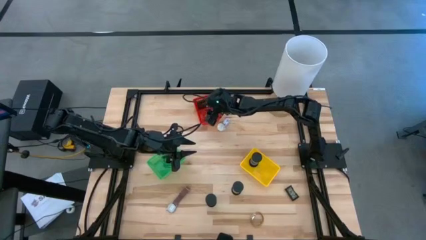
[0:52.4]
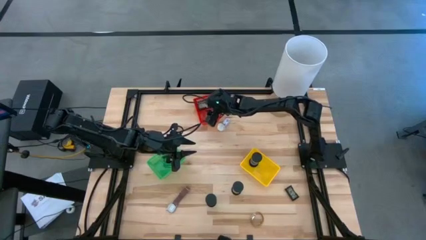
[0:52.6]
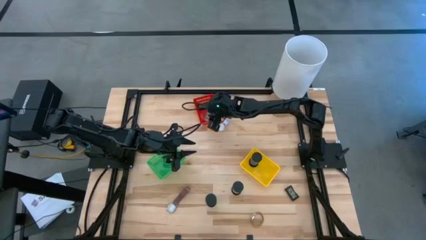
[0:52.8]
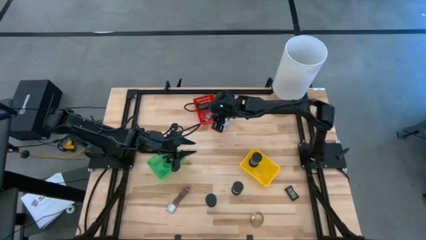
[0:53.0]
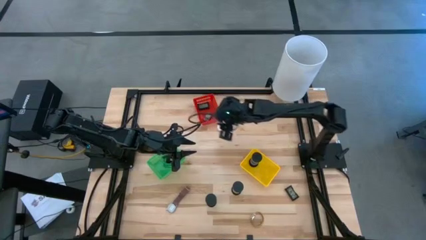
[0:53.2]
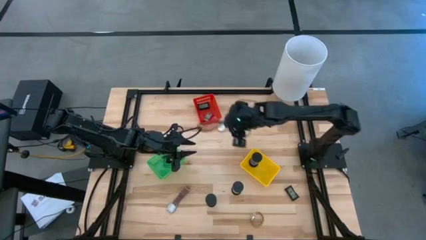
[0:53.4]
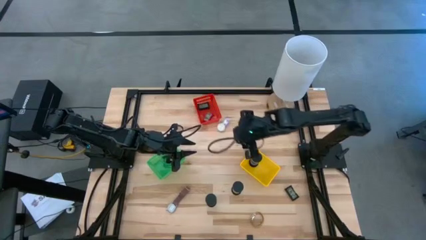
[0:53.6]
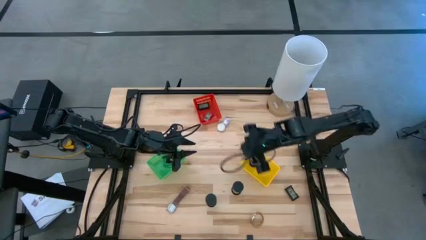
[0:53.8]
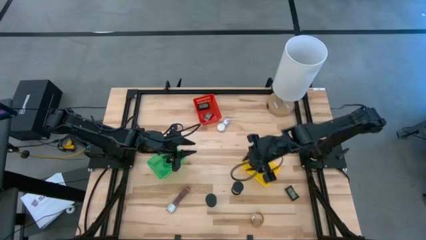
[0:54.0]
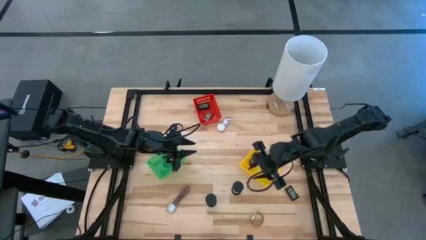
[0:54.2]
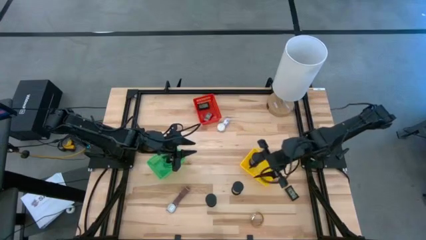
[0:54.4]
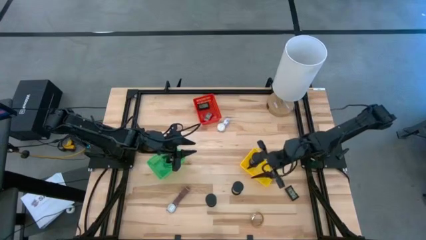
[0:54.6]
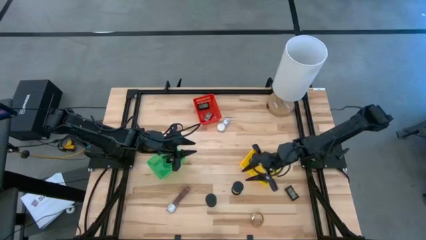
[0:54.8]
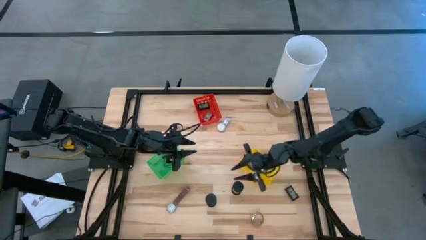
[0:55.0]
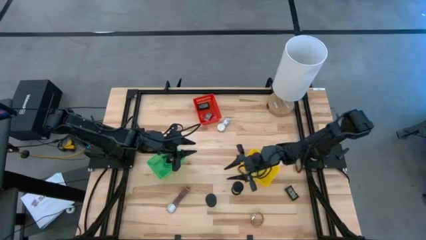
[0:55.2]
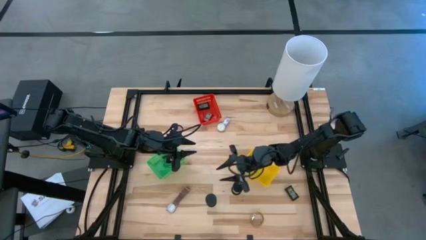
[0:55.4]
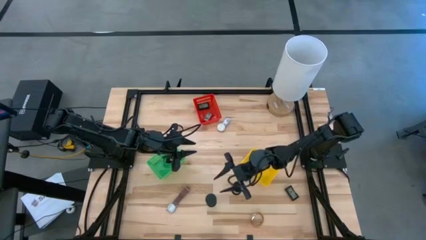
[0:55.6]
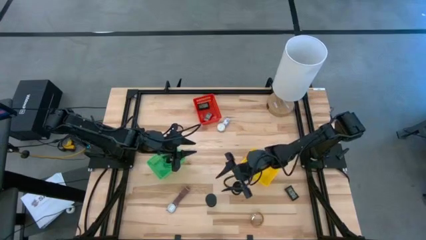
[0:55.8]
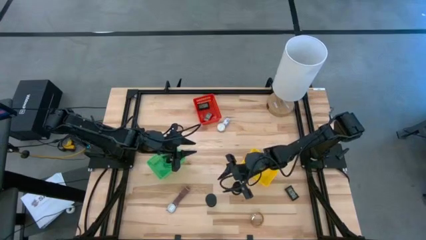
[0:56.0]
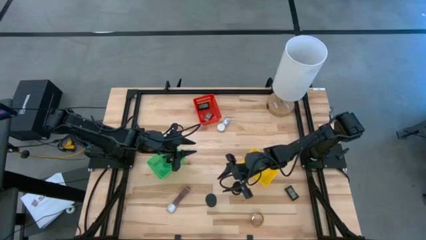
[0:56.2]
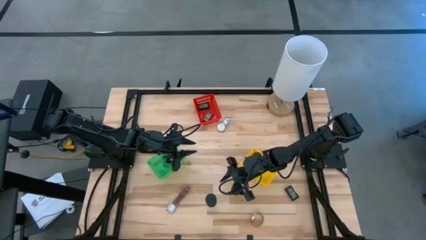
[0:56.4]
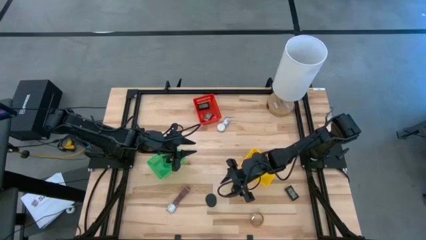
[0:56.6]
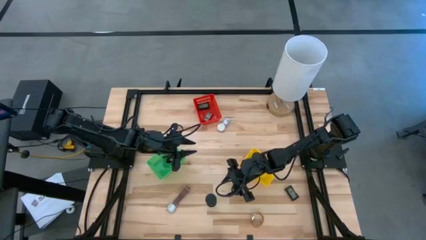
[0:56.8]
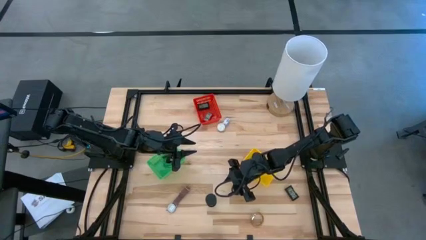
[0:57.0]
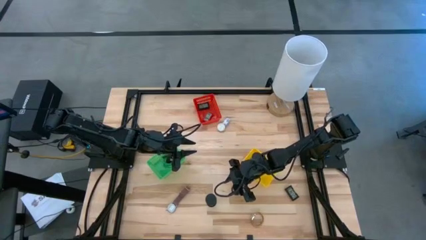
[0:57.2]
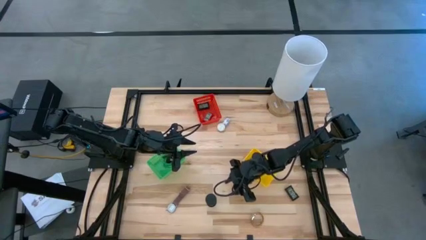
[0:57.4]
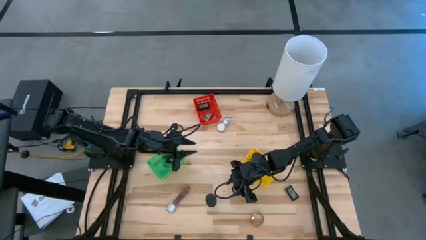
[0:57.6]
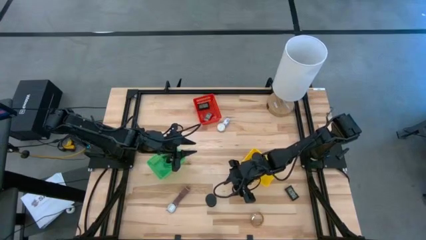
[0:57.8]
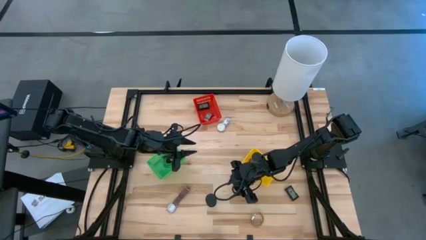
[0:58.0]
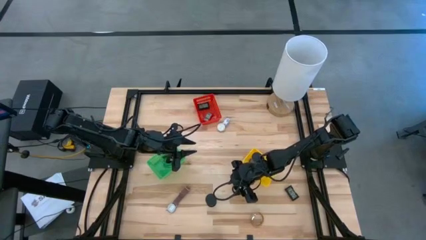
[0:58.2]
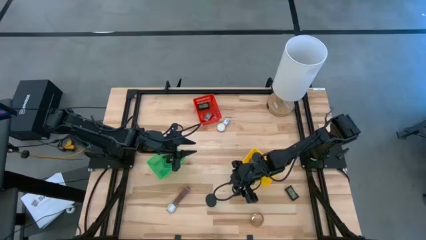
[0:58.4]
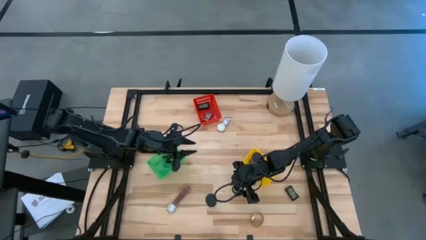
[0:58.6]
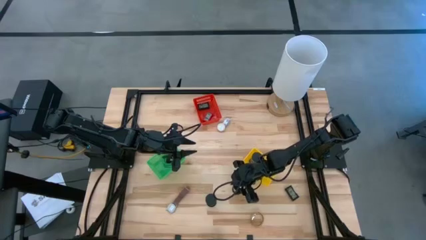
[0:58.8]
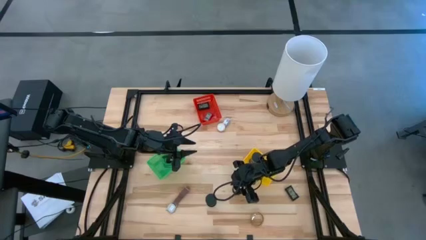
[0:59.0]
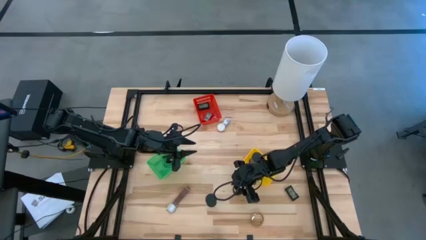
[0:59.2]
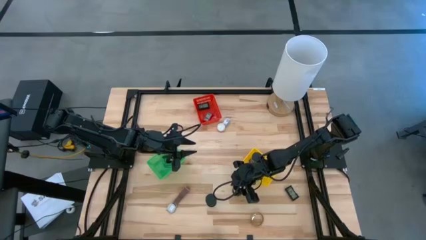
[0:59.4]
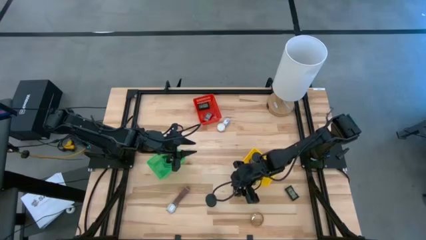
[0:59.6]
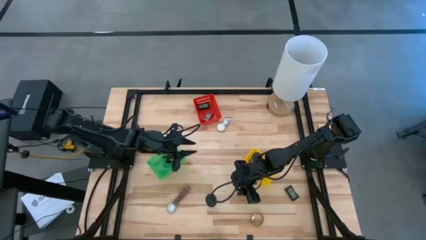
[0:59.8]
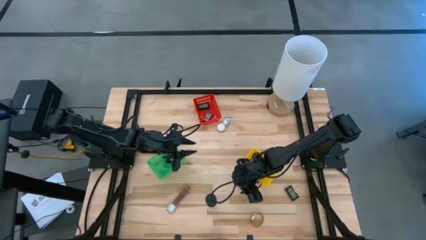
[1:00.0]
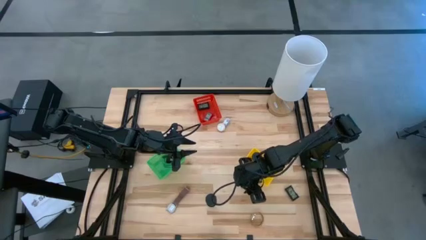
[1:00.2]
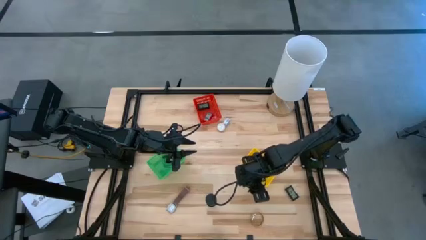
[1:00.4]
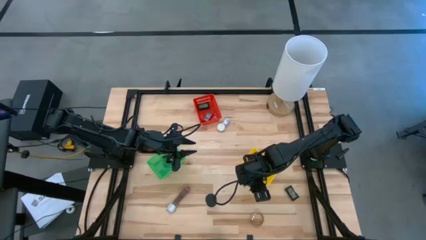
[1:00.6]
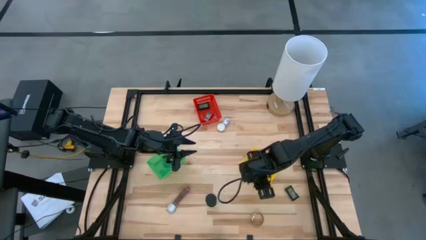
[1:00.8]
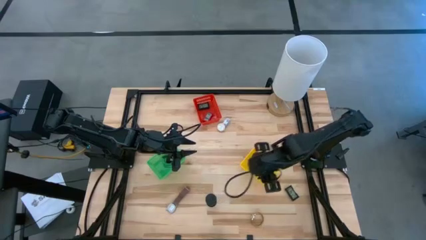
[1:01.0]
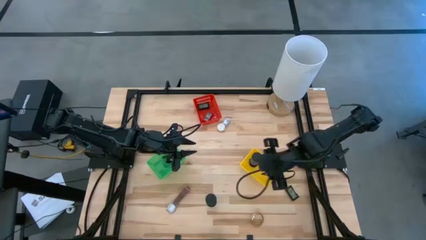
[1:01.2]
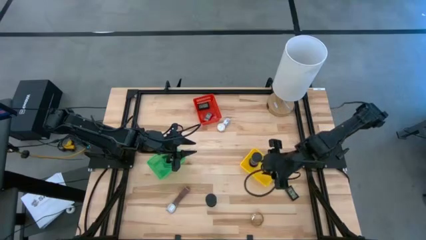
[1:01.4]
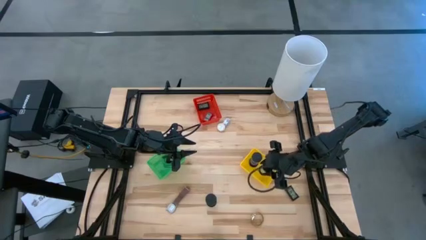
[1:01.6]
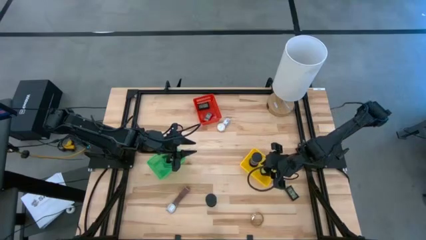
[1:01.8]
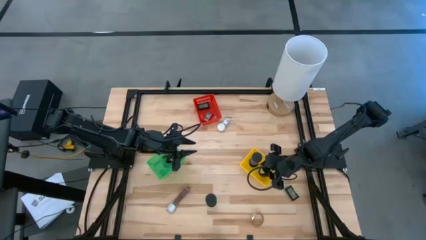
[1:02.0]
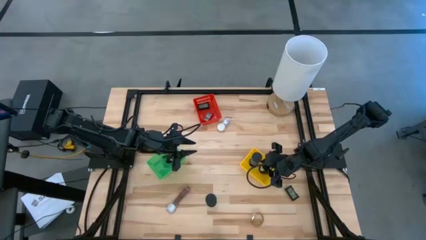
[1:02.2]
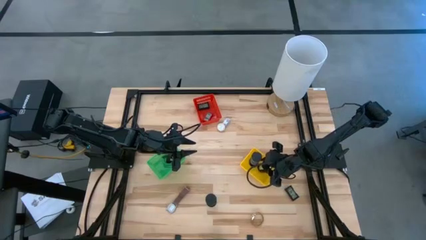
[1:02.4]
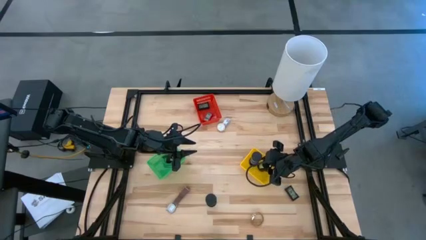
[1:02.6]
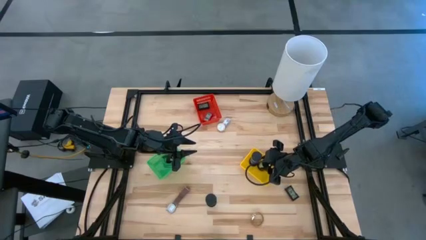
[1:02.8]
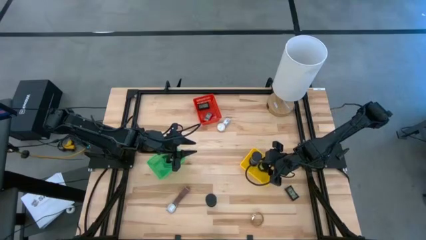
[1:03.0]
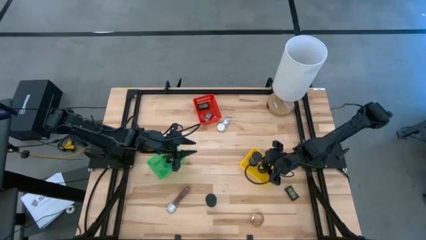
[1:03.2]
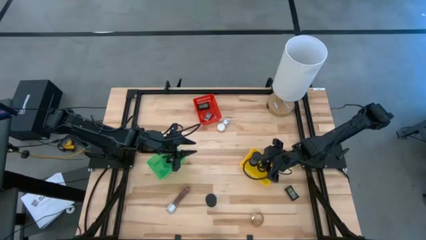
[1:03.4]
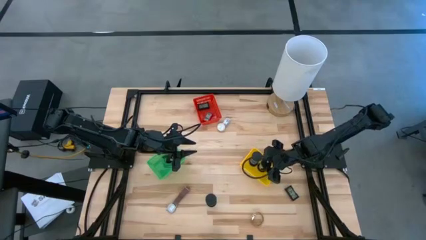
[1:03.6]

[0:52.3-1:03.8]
Task: Pick & Place Office items
Put the top green hourglass into the yellow bin

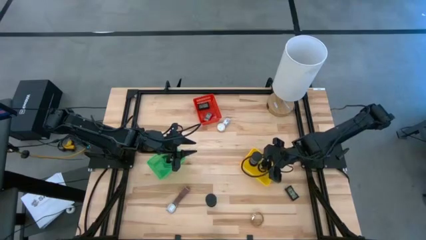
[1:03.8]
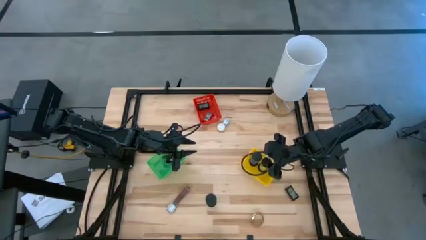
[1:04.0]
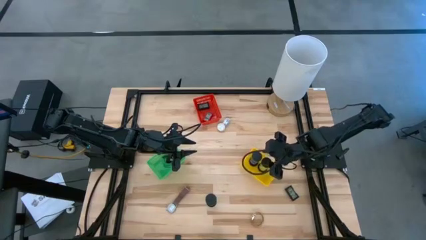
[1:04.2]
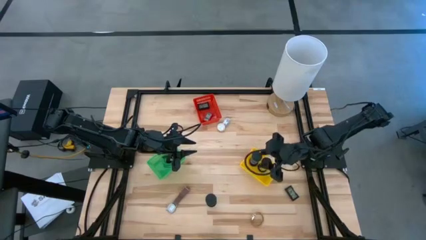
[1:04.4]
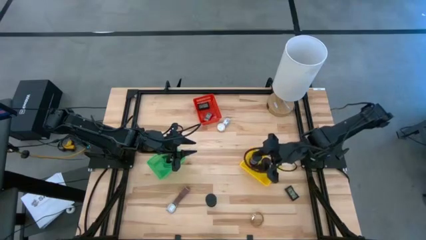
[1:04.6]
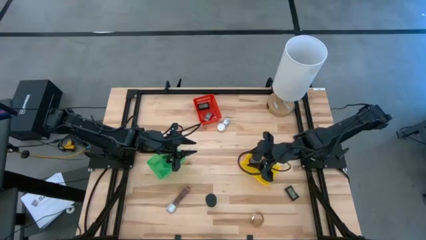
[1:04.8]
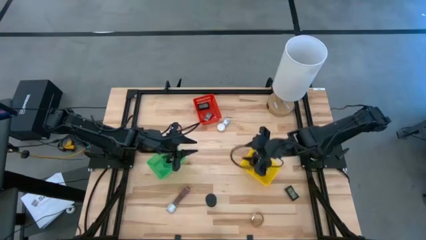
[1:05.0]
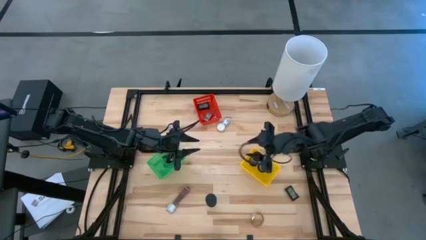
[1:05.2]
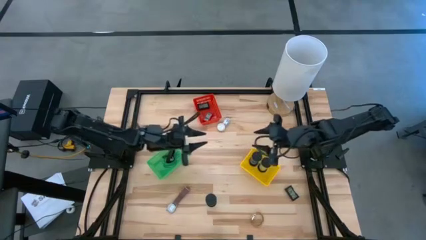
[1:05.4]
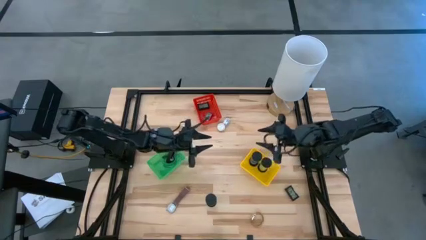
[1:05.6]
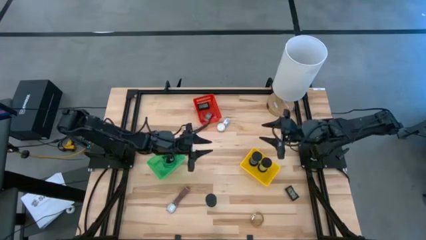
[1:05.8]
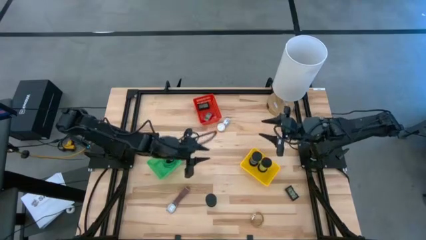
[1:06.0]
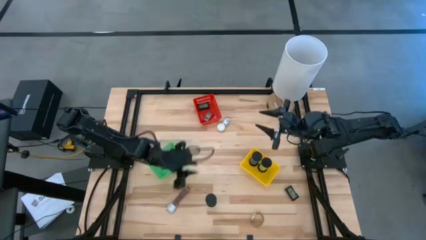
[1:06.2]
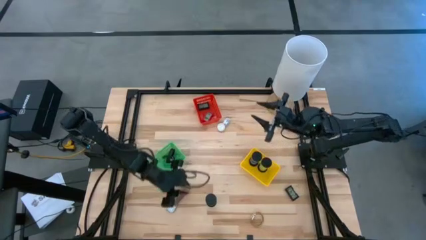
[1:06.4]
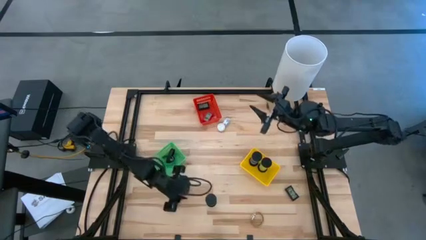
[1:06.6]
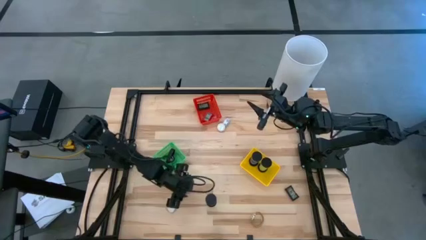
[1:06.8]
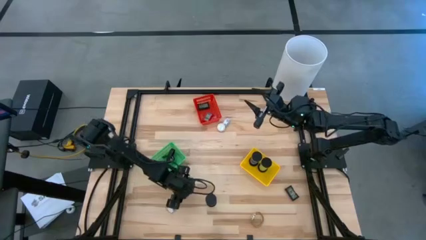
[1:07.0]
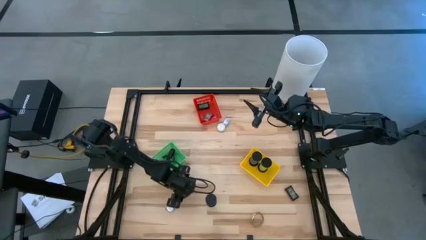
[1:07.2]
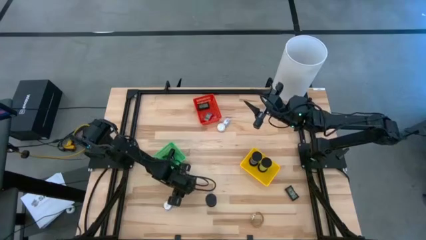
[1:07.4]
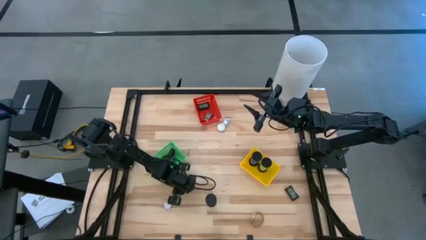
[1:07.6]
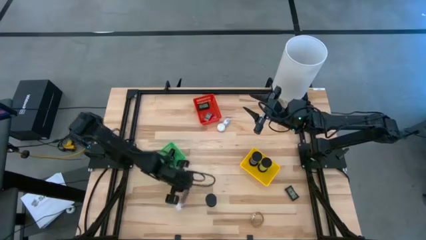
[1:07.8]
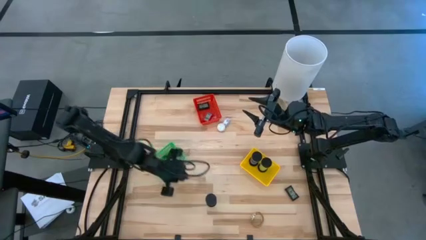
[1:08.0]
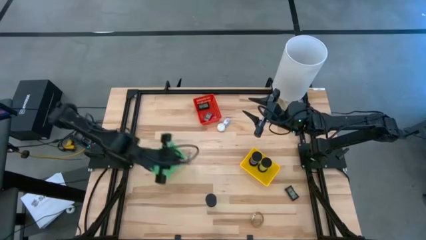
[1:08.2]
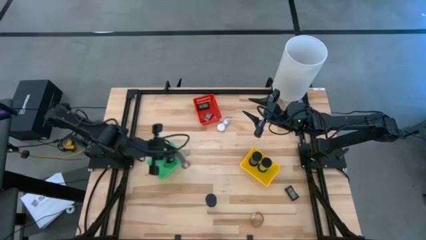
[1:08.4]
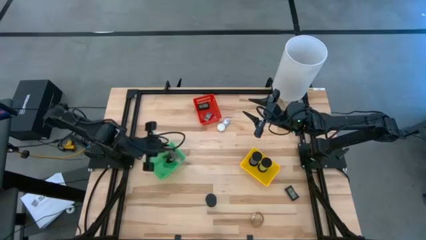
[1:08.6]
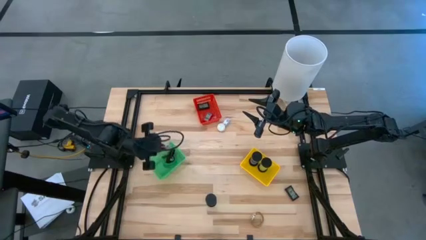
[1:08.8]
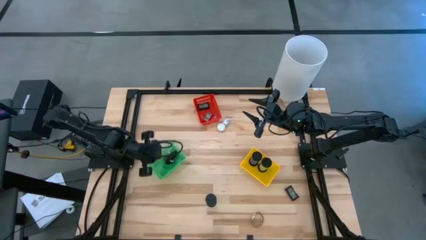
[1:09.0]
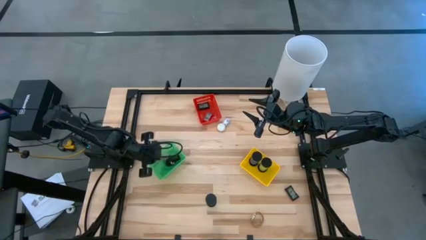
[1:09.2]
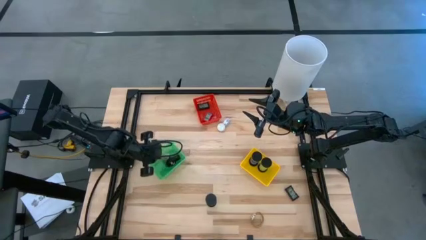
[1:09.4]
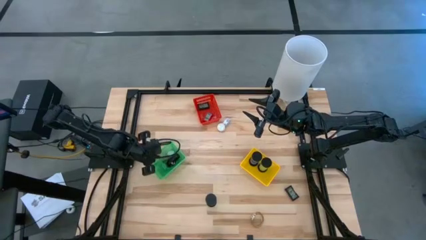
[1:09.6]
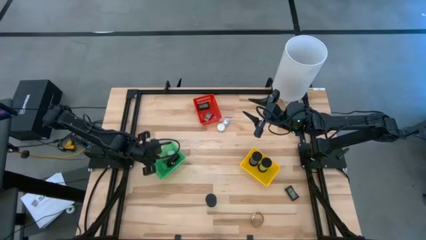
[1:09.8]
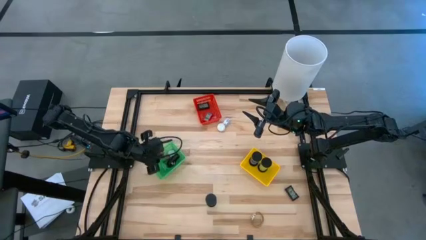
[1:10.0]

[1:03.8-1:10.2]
Put the brown wrist watch into the green bin
